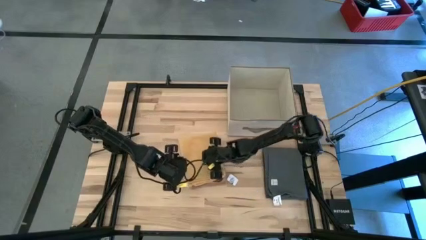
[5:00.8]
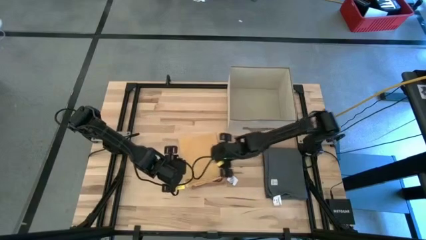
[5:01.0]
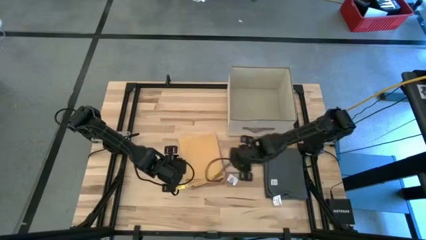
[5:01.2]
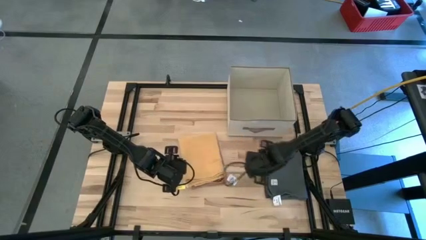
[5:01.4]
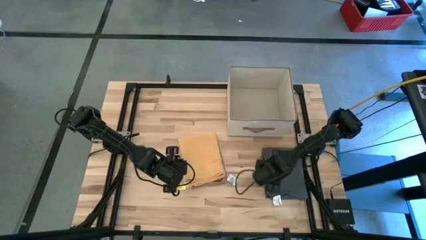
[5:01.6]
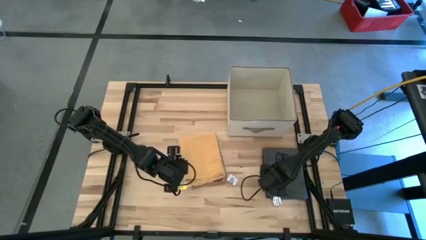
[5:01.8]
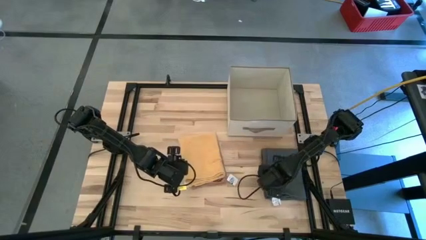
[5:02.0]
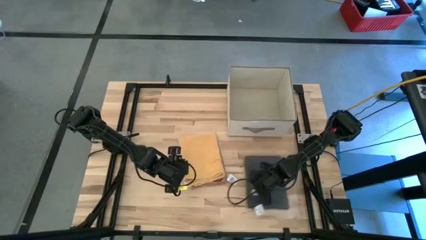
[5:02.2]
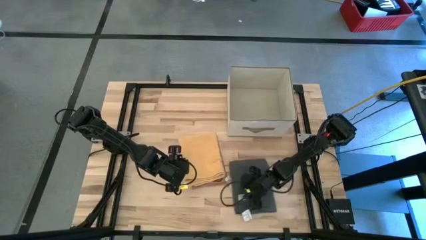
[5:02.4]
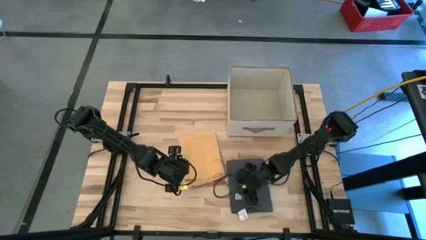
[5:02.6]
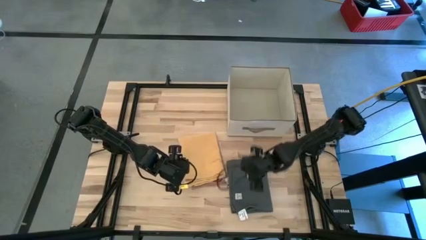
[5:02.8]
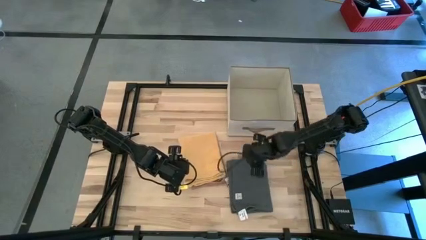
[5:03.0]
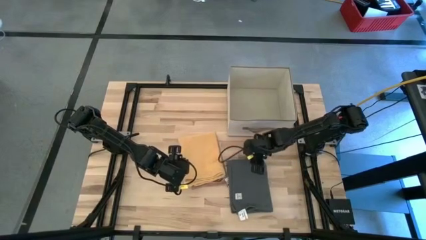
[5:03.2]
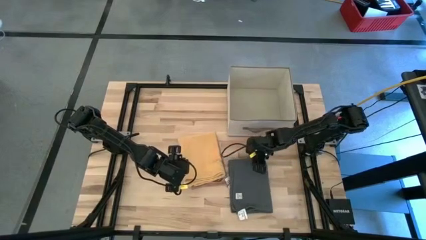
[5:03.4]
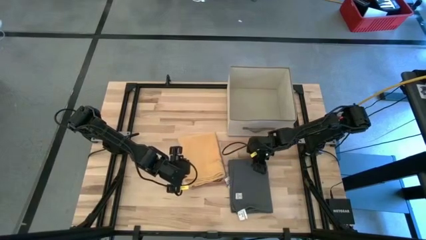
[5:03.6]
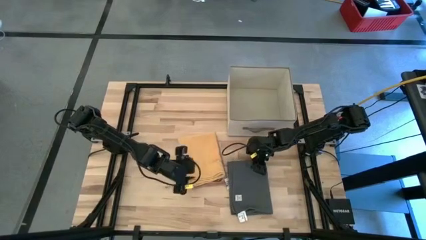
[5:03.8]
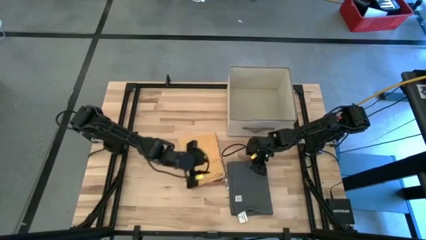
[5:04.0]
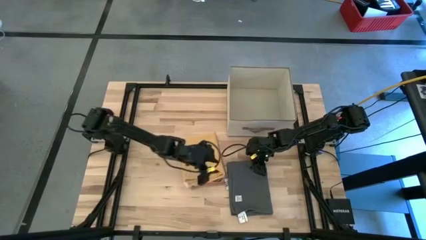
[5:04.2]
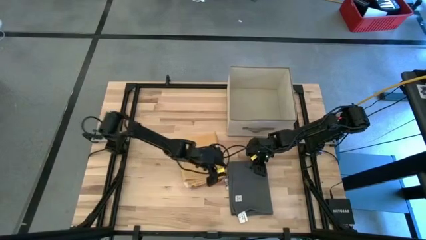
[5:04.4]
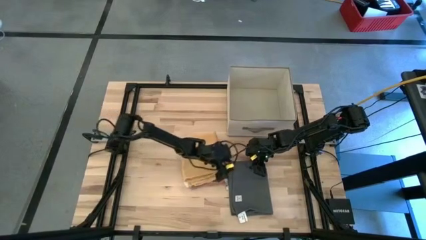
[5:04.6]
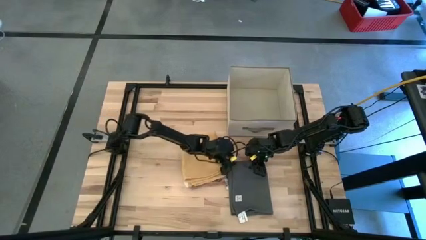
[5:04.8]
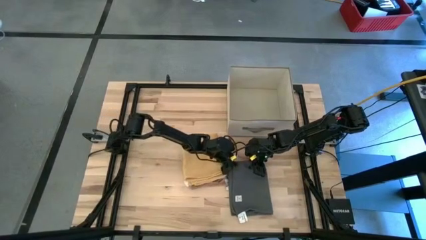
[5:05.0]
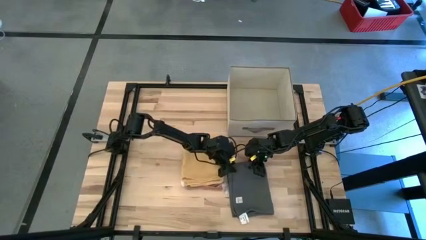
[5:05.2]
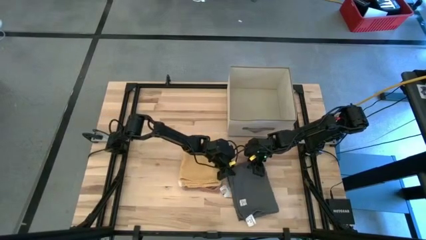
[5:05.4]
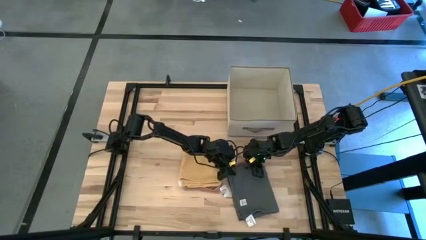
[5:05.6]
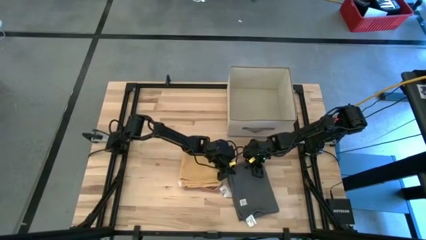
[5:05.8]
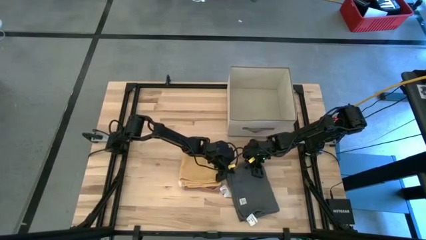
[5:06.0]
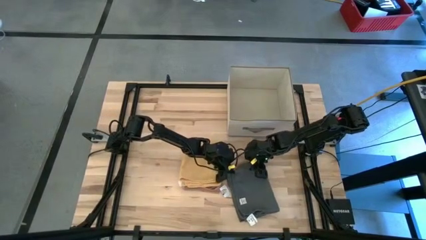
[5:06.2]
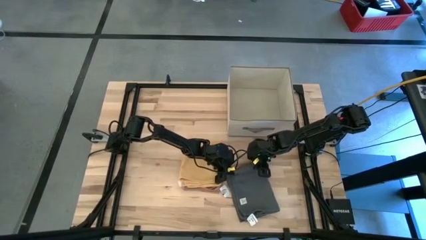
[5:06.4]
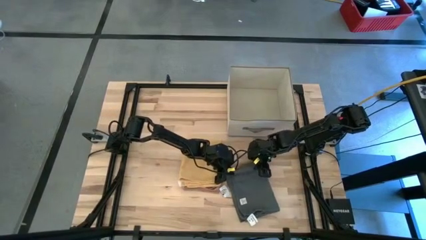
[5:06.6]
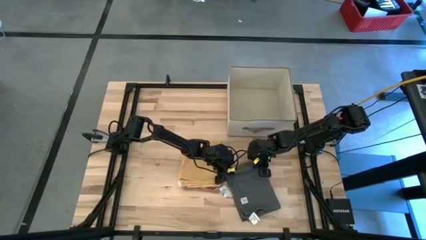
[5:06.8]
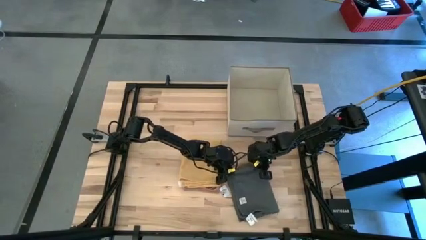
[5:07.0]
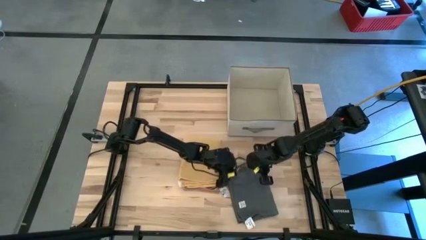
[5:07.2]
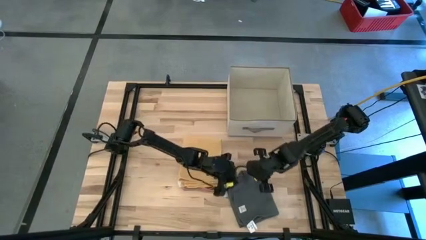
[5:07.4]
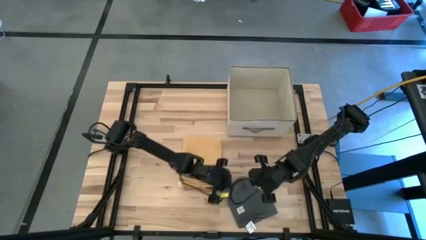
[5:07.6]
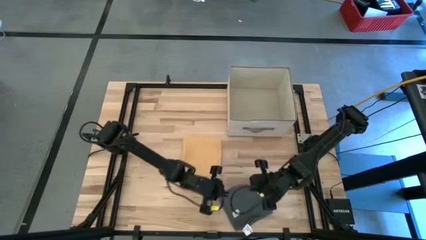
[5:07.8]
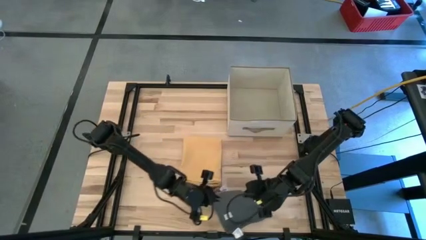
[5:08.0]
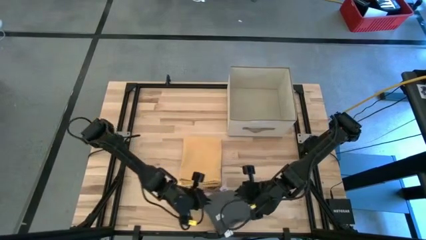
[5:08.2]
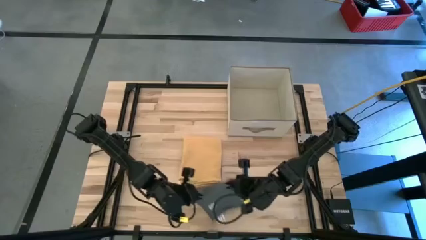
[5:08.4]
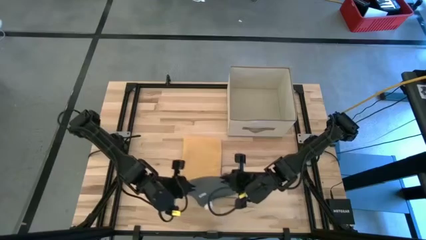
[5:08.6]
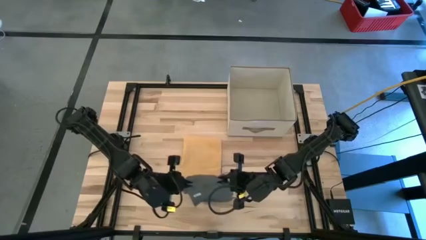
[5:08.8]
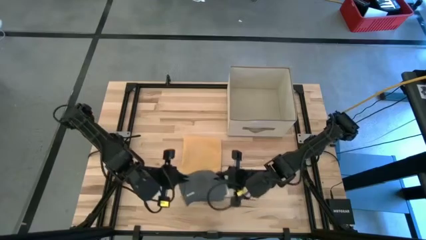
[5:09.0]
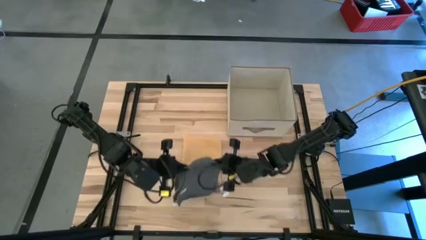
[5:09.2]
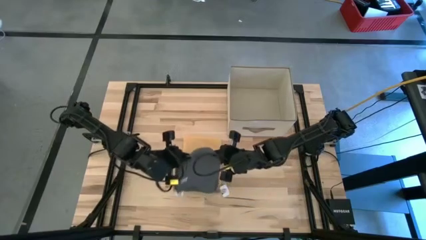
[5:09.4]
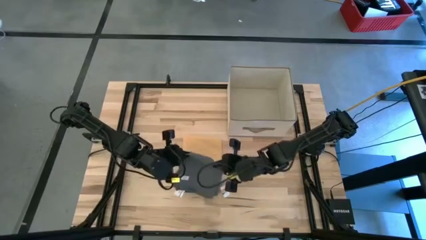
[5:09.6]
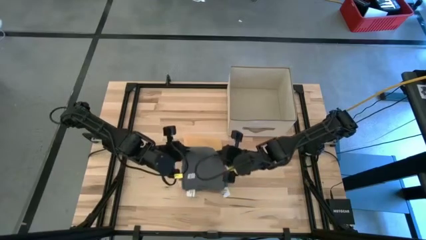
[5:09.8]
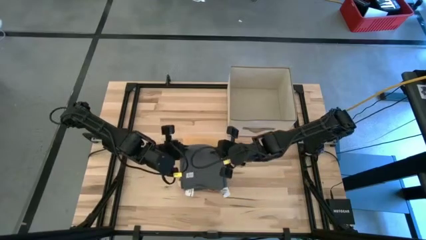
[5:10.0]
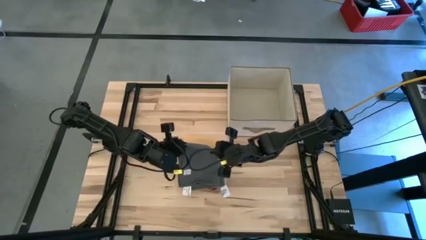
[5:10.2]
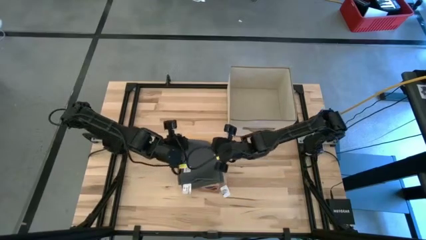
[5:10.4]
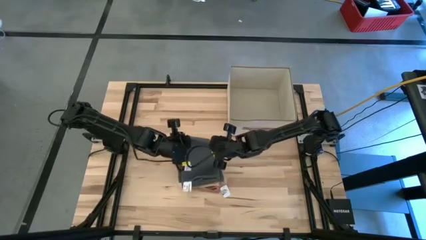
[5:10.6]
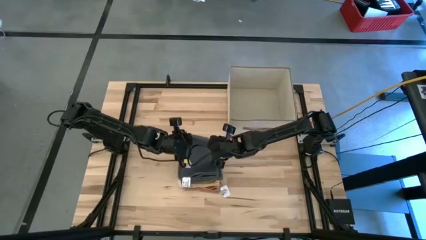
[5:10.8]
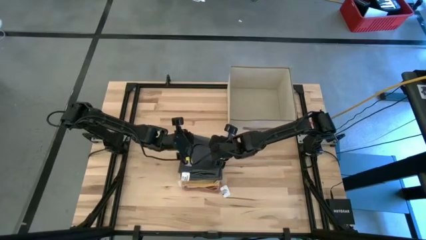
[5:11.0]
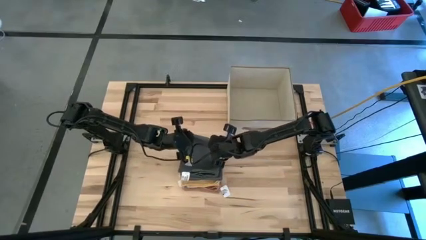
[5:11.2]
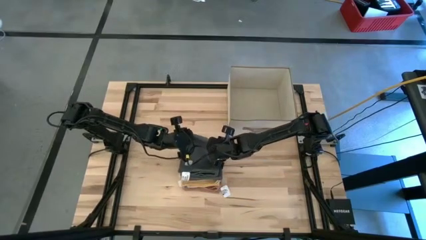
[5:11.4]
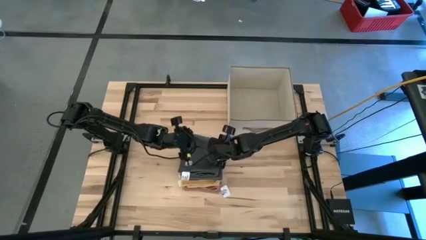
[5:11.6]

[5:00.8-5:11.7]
Task: Fold towel
Stack the gray towel into the yellow towel

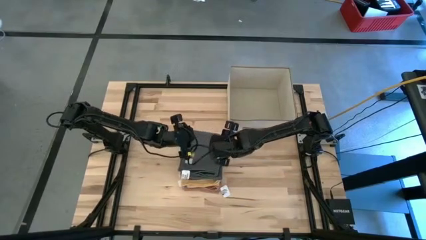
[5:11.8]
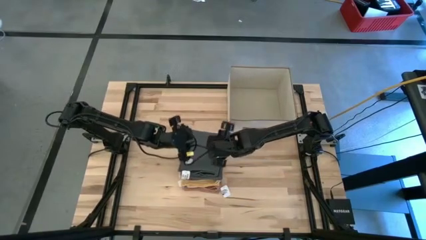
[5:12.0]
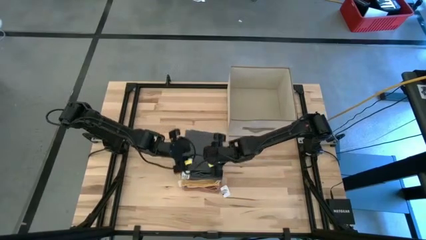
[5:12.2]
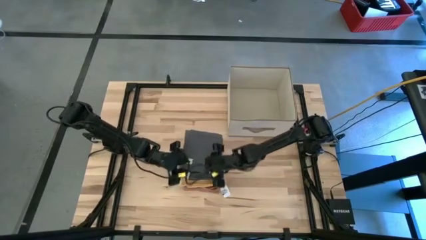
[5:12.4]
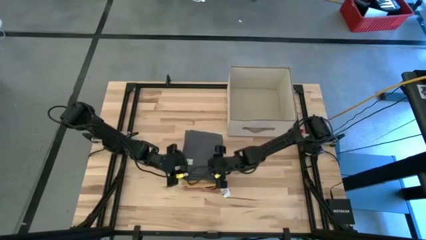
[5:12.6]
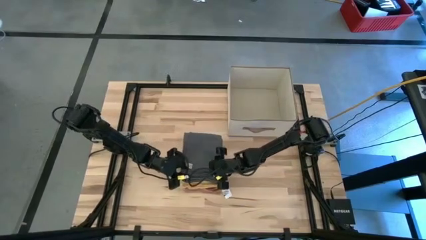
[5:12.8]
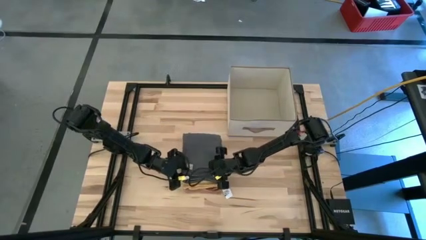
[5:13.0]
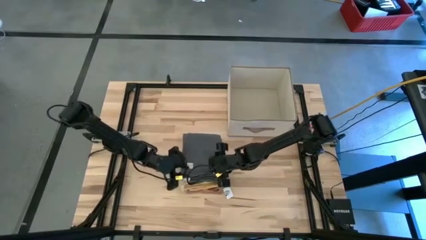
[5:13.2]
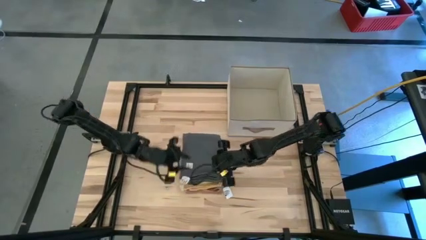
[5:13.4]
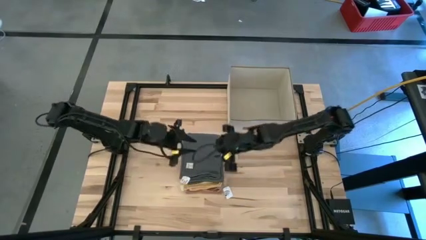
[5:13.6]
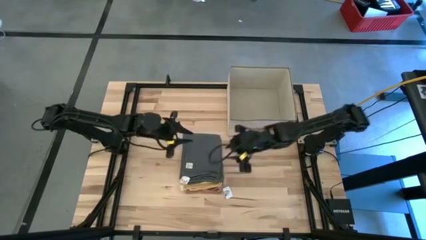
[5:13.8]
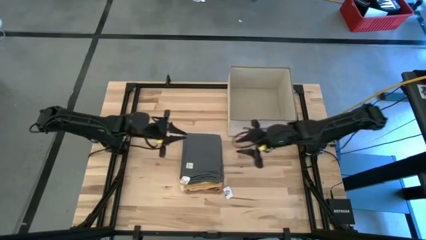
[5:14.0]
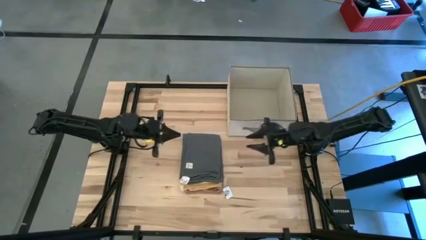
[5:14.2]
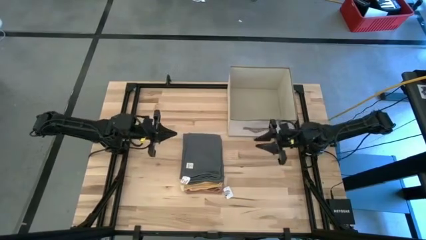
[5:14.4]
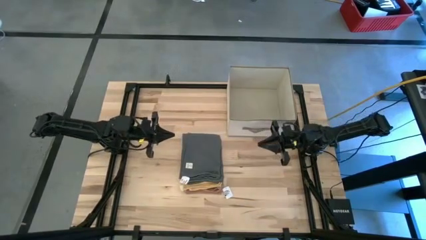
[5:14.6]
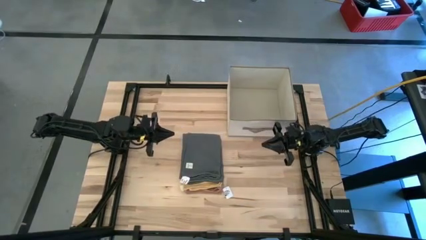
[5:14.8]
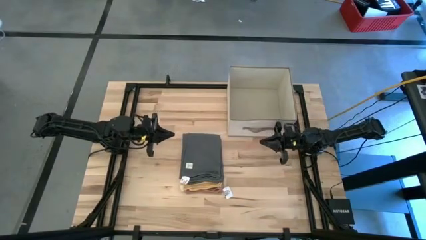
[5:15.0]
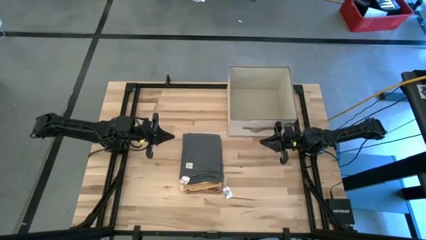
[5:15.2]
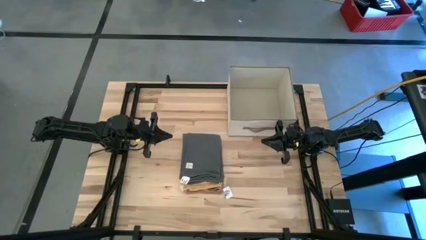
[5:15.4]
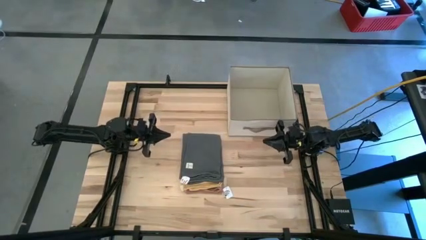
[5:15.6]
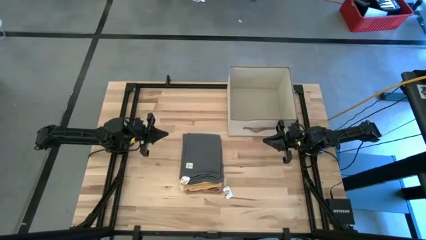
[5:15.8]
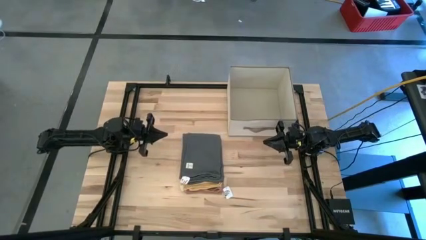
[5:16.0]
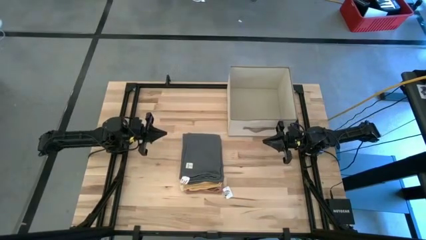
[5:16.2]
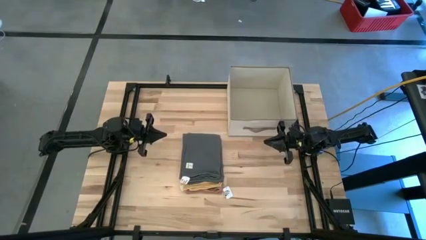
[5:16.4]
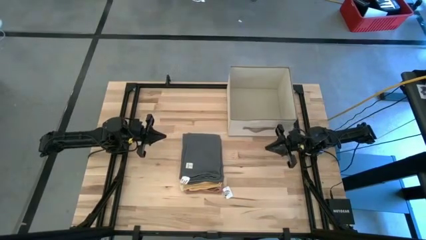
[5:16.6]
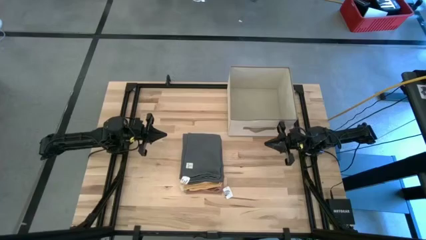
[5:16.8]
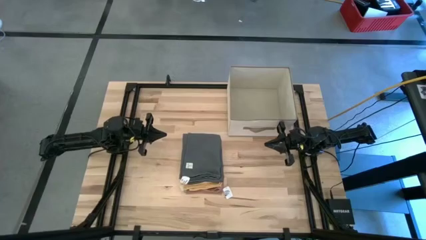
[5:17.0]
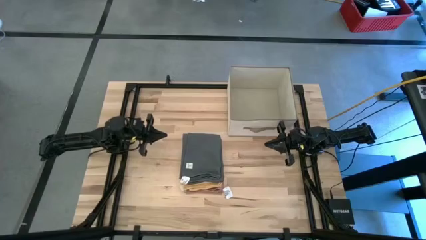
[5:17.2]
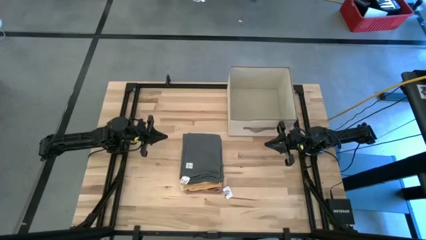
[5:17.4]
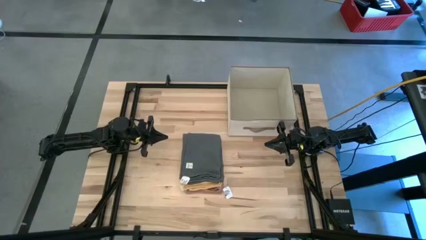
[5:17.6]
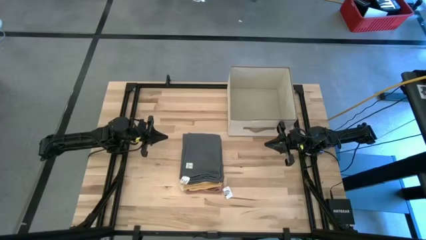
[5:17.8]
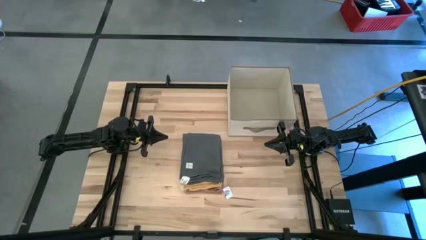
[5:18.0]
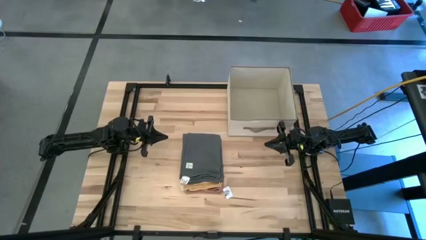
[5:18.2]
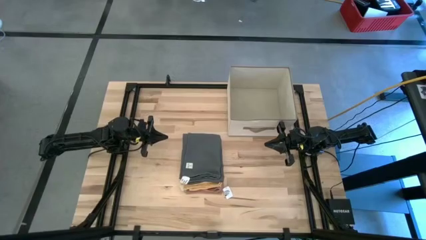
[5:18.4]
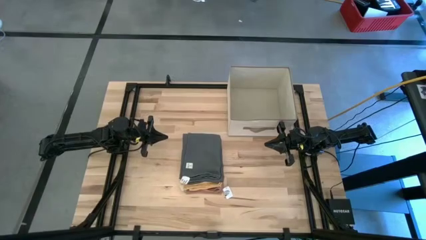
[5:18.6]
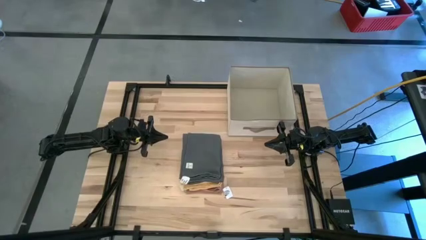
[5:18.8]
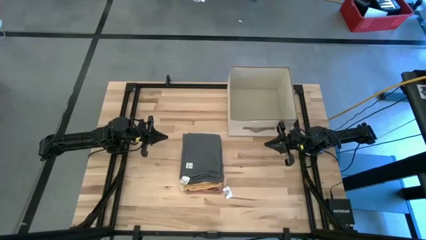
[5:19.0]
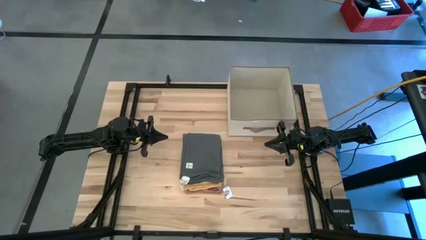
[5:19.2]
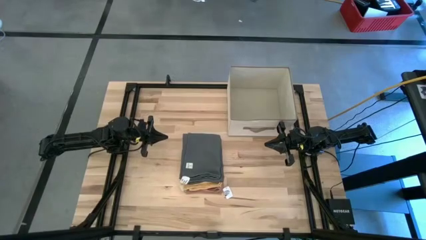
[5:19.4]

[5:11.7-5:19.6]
Return to Home Position
